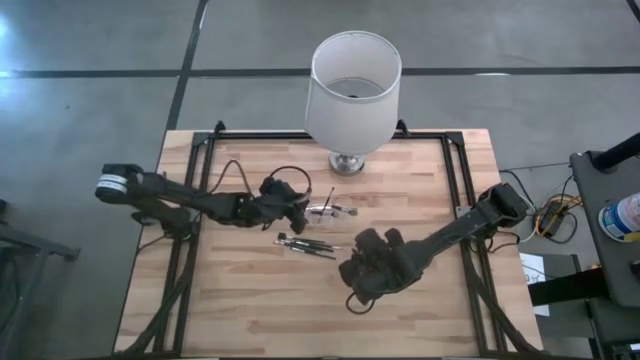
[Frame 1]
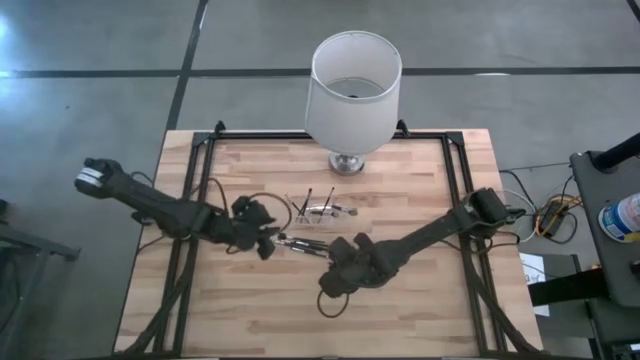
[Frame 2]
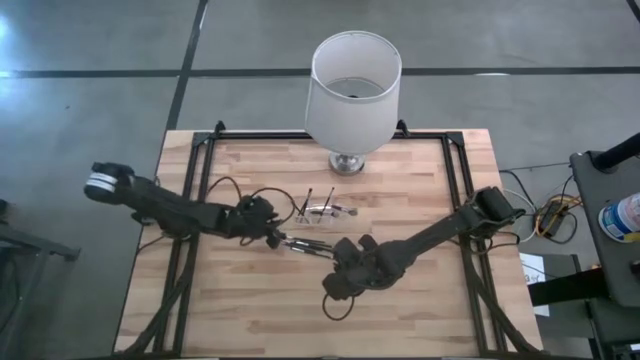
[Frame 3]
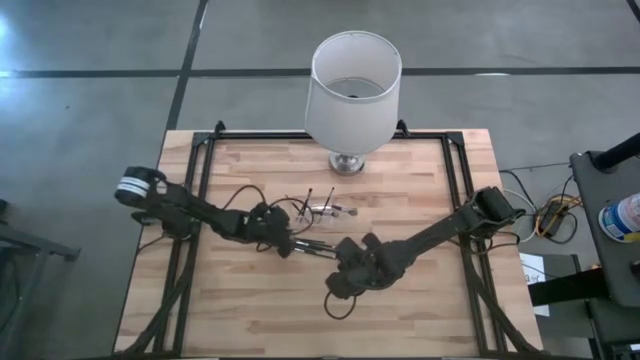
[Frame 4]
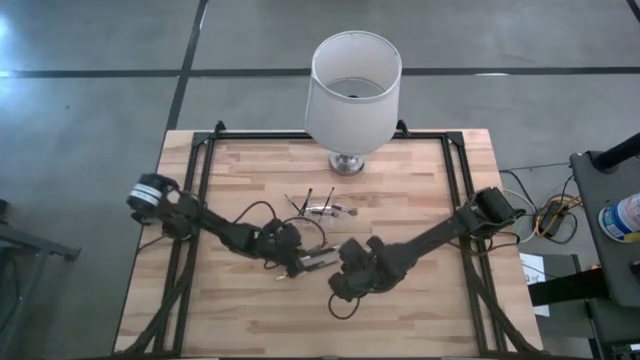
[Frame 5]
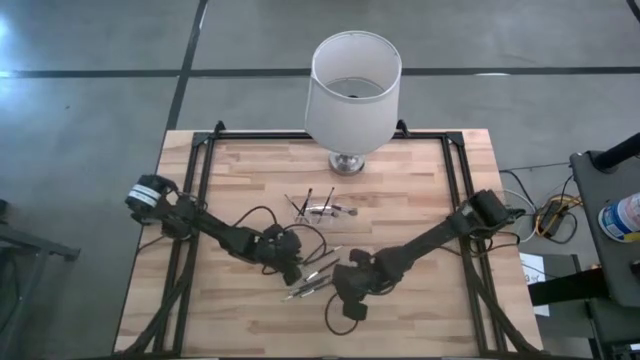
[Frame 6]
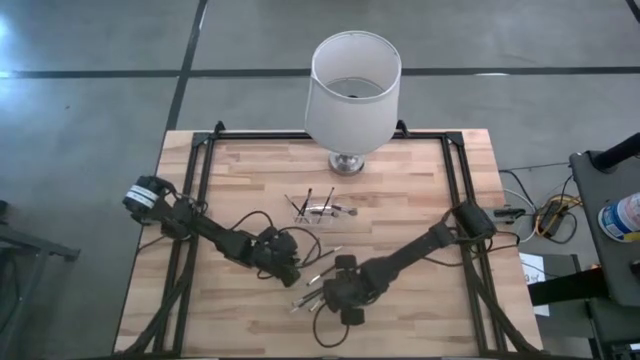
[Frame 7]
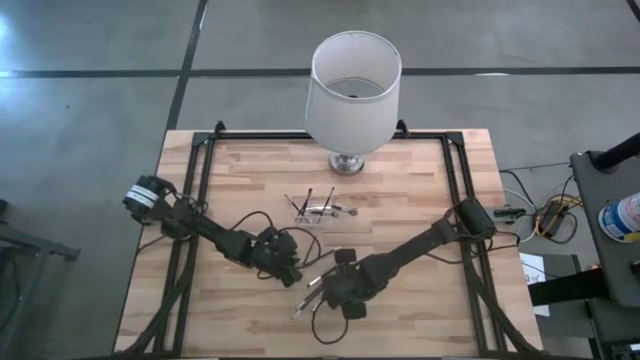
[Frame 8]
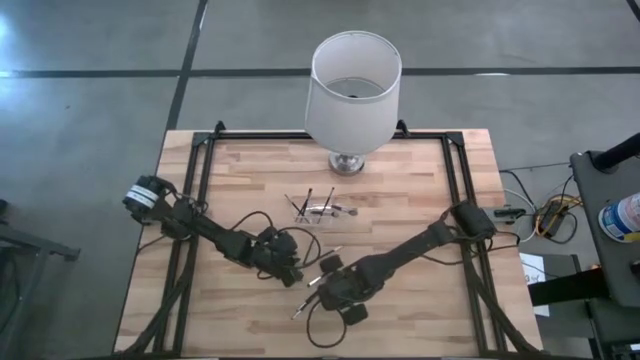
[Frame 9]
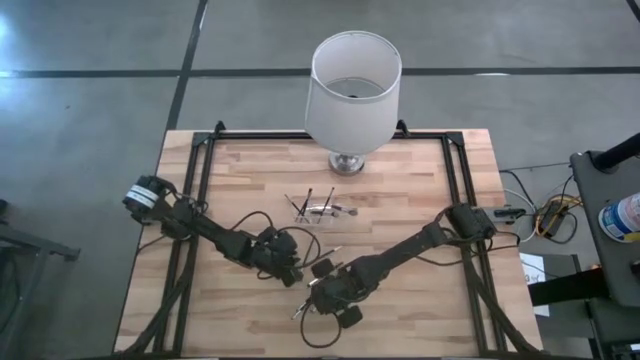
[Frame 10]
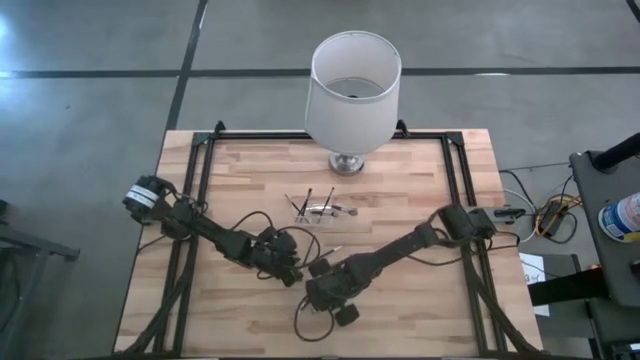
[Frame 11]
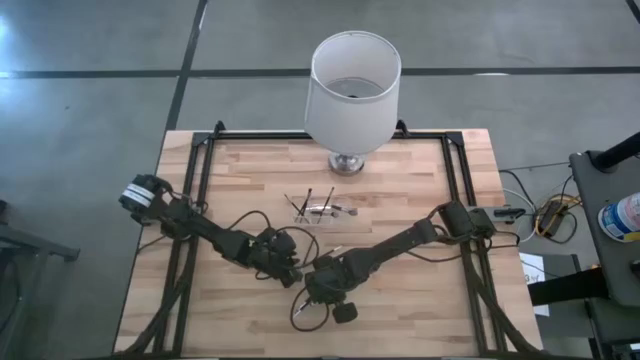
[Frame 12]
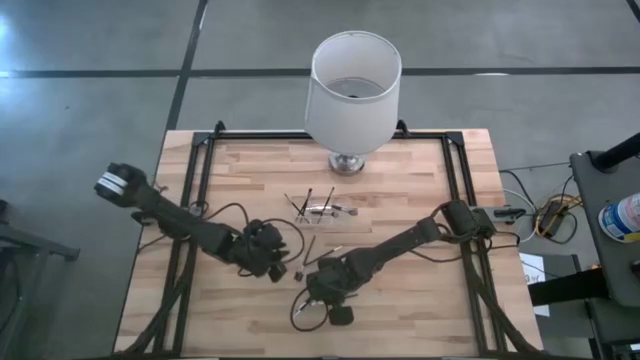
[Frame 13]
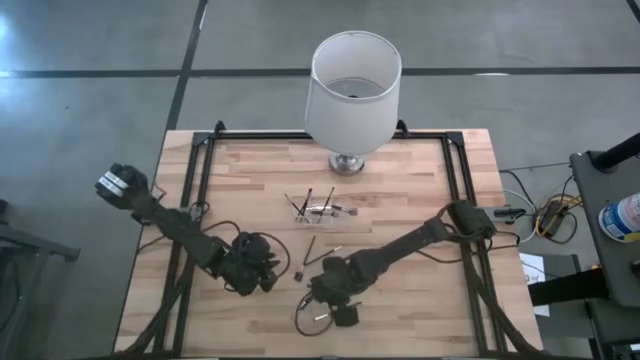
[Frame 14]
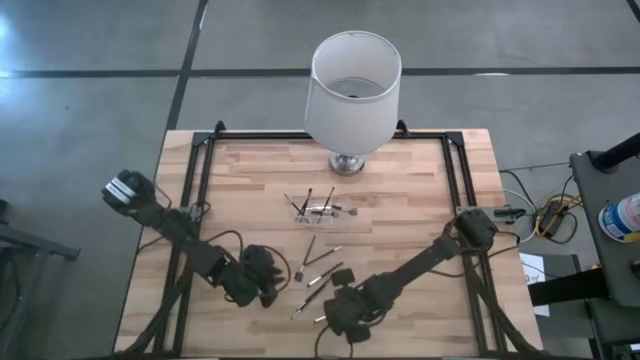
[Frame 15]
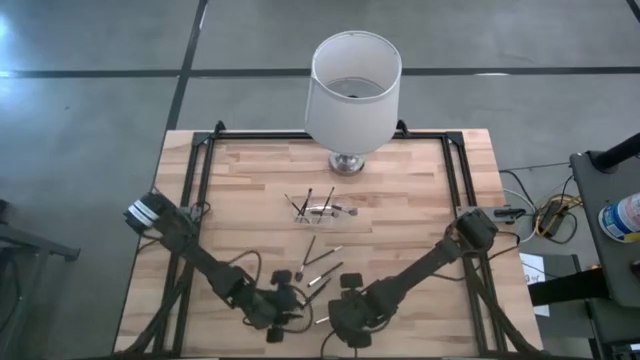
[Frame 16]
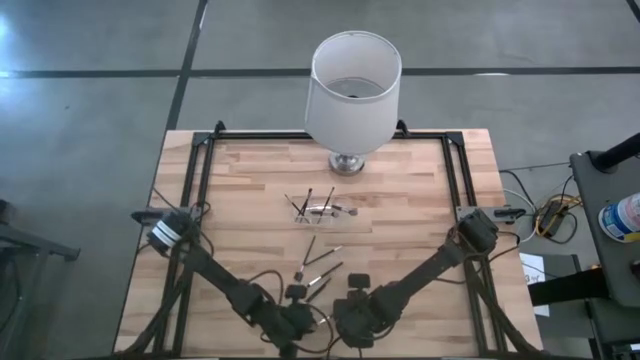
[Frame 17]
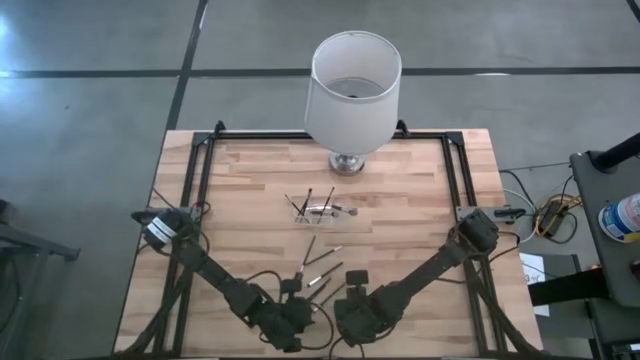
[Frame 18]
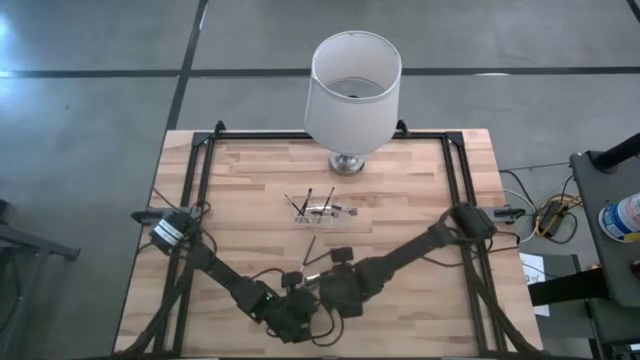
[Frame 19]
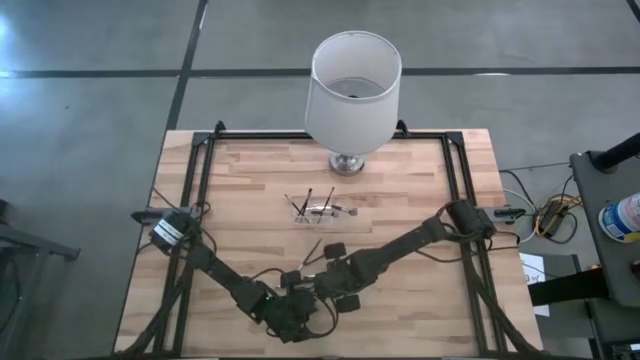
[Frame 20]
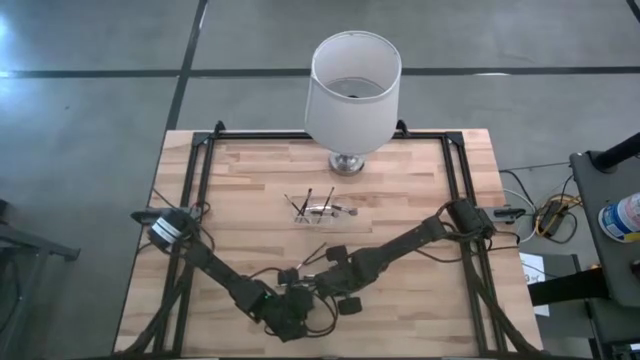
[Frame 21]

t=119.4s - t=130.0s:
Task: Put items in baskets/containers
Put the eyeshadow brush into the transparent organizer

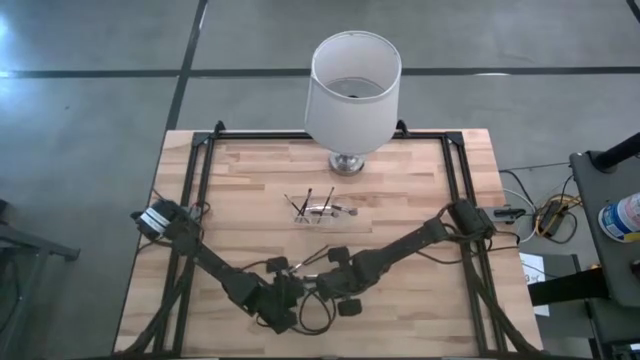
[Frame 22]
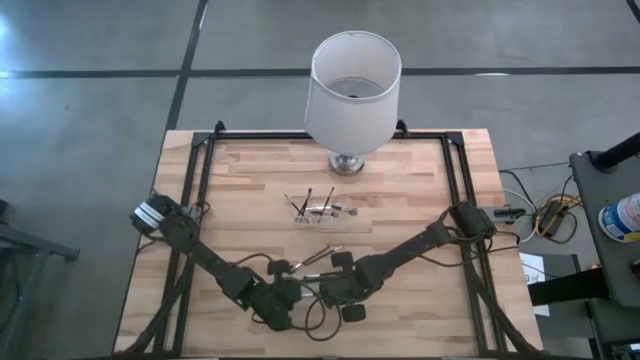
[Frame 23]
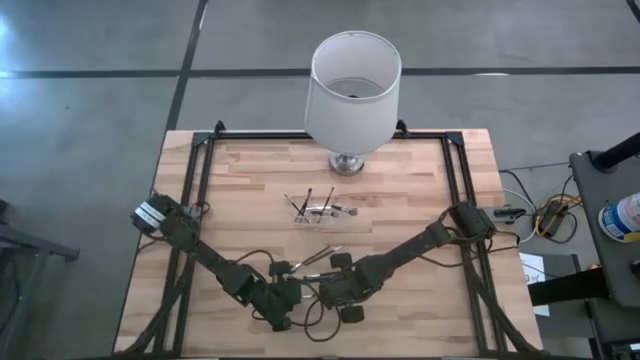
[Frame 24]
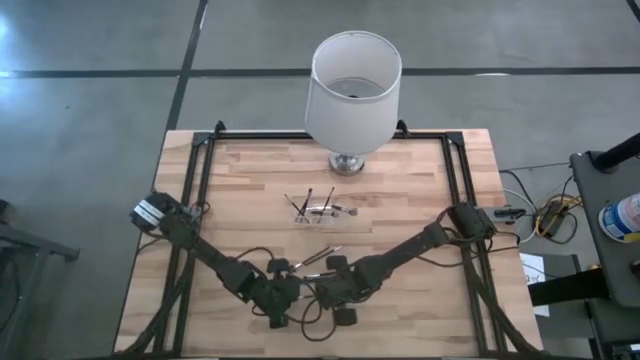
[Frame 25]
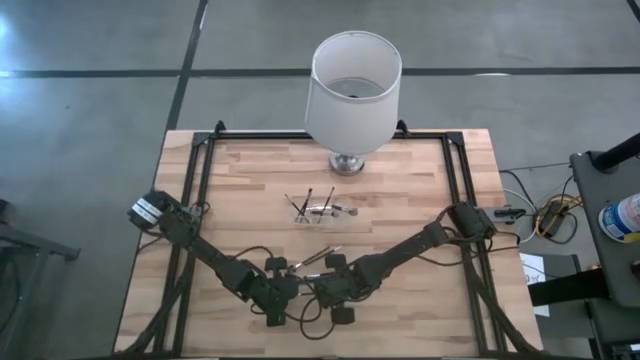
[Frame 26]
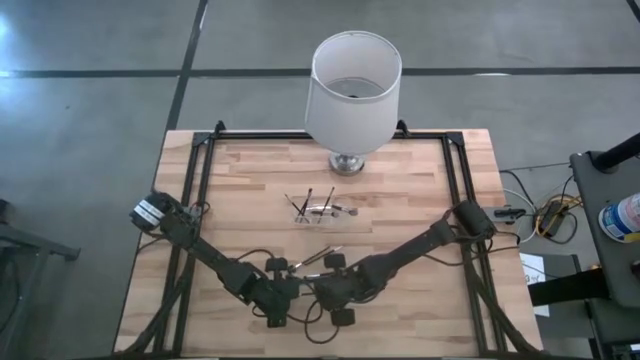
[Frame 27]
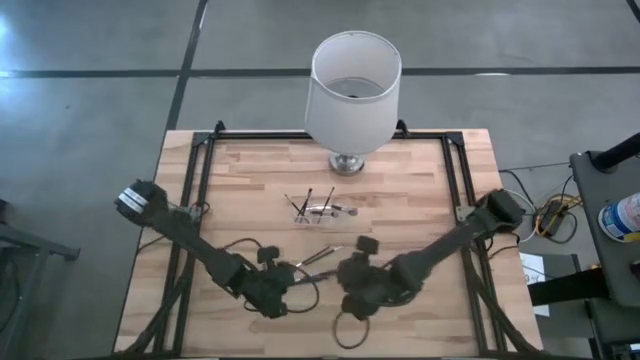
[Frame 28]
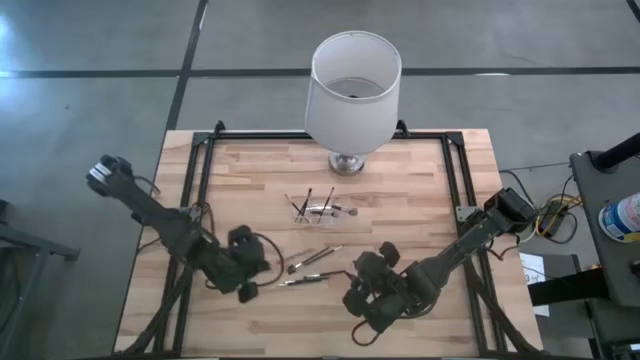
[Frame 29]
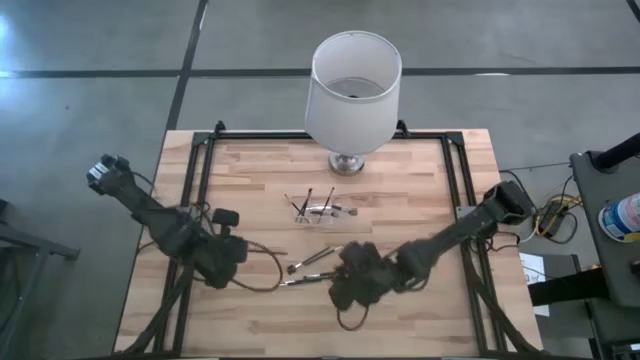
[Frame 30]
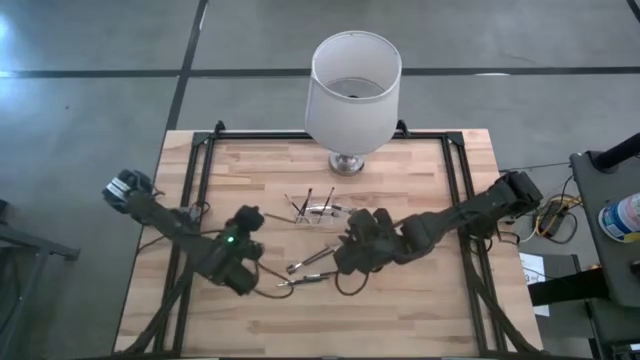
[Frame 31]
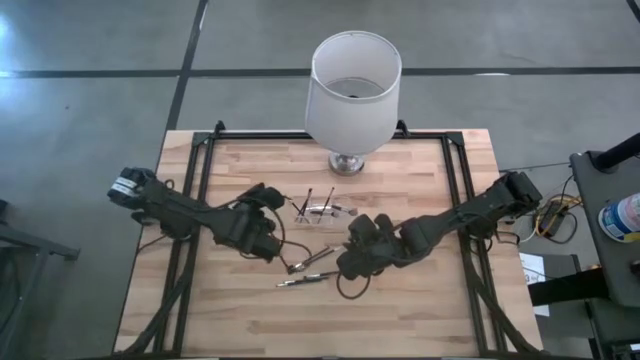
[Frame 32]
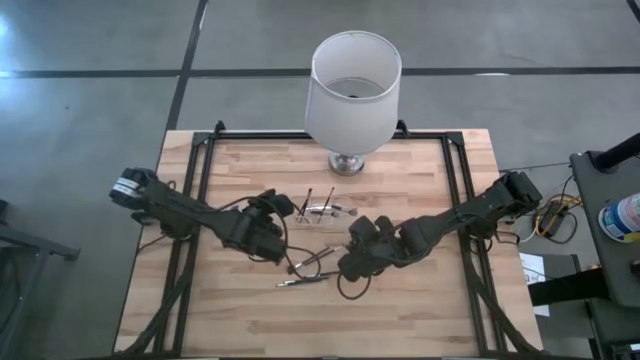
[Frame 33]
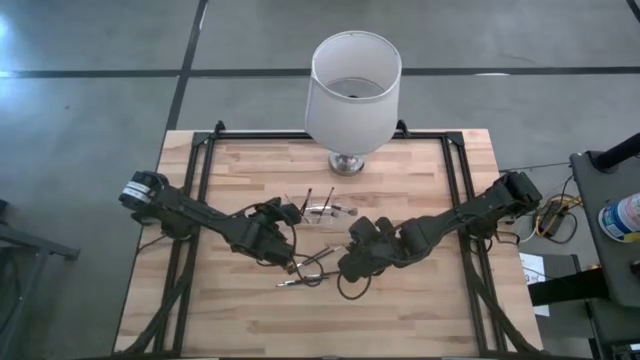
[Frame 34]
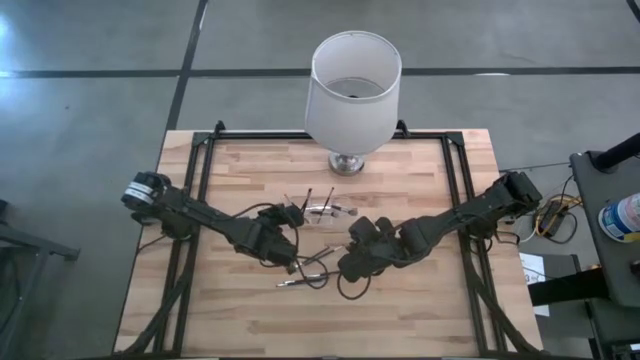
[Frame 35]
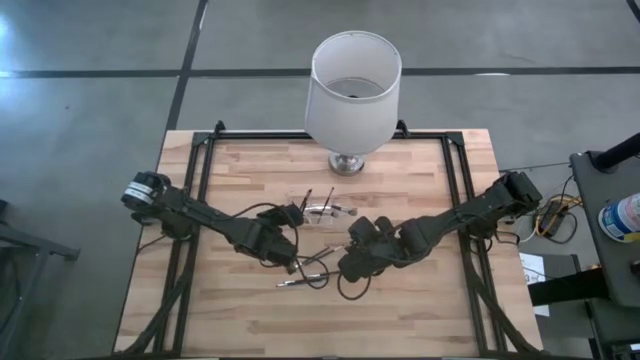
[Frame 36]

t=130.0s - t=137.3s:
Put the eyeshadow brush into the transparent organizer

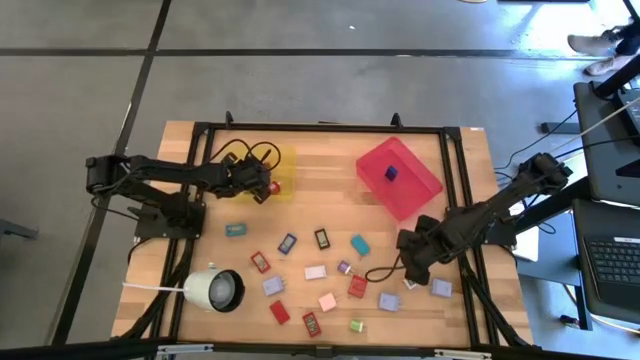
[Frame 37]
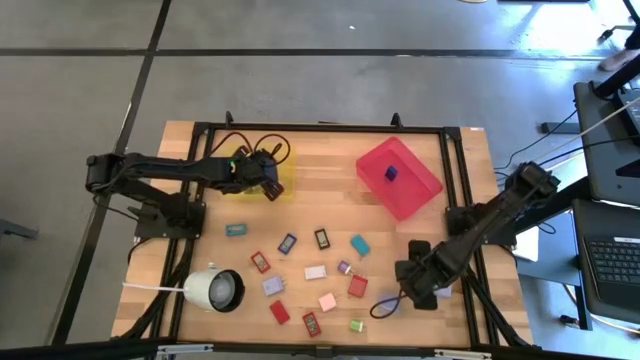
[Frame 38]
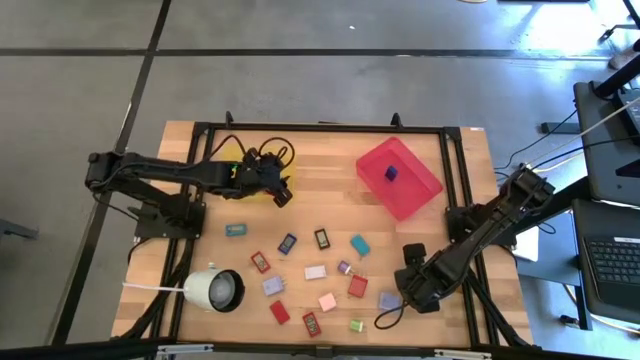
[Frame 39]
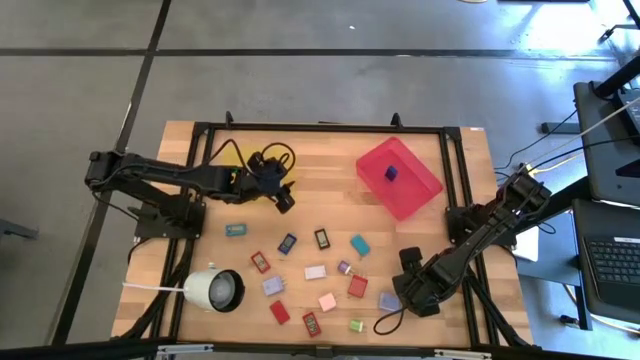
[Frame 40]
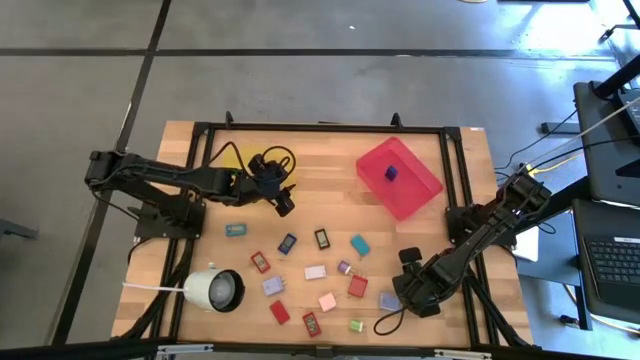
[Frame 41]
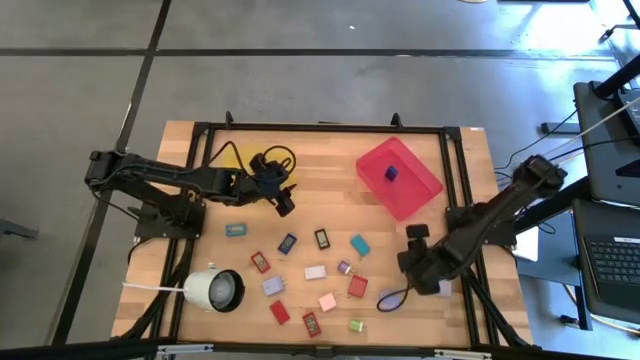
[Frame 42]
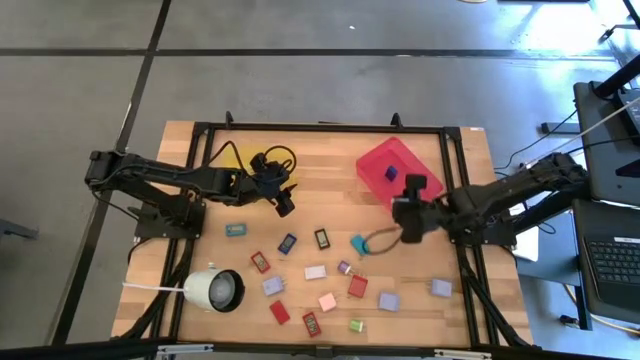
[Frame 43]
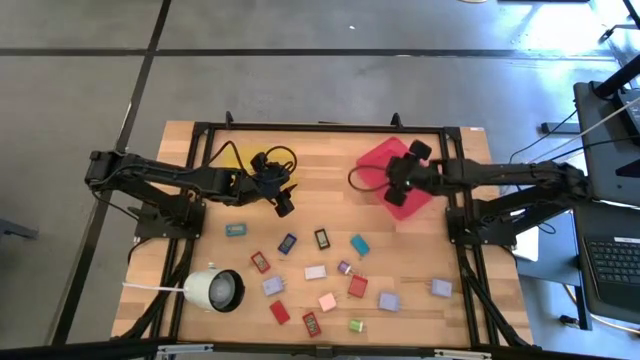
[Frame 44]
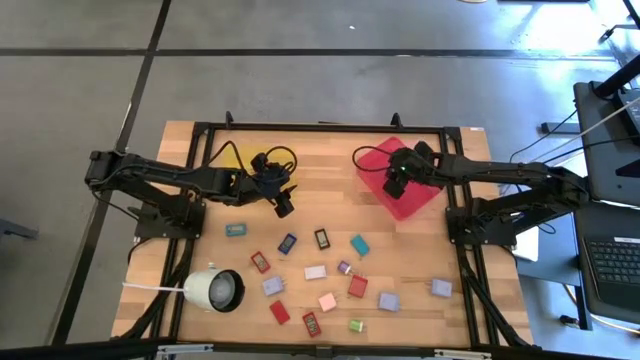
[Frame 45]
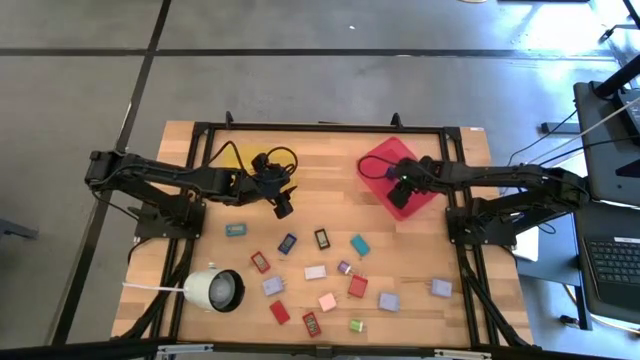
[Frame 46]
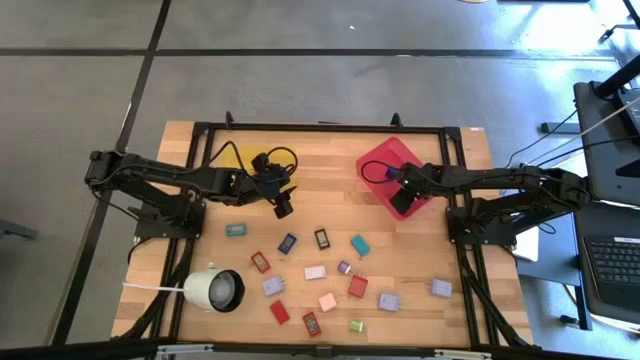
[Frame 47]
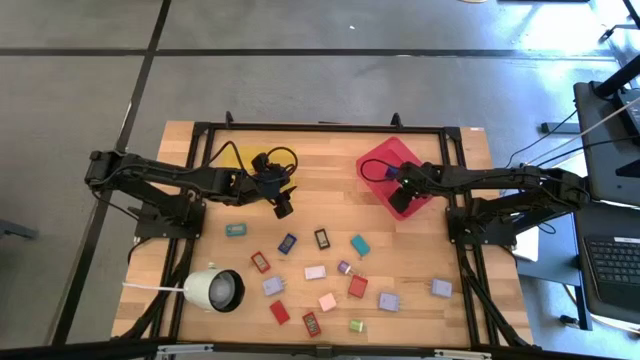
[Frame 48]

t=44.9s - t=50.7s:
Task: Pick & Place Office items
Put the right white digital clock into the pink bin
